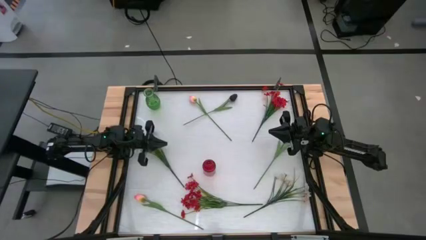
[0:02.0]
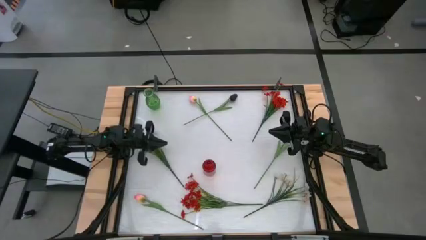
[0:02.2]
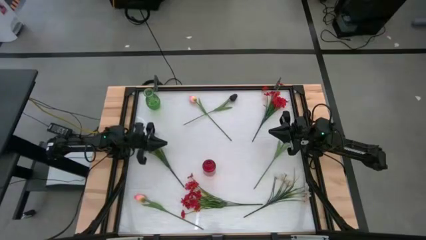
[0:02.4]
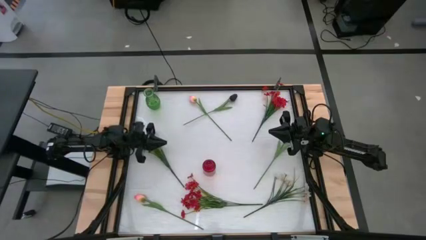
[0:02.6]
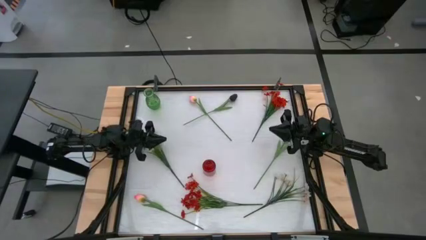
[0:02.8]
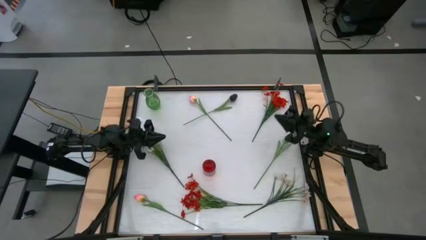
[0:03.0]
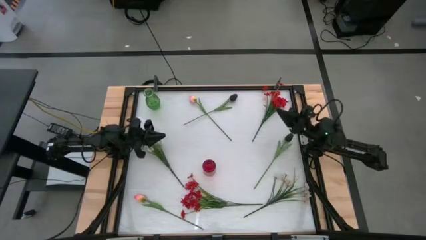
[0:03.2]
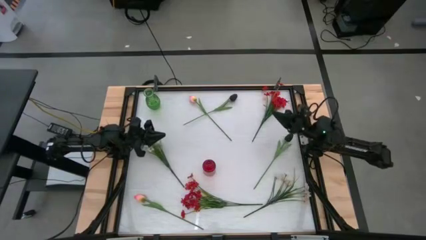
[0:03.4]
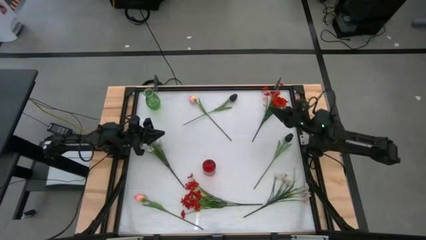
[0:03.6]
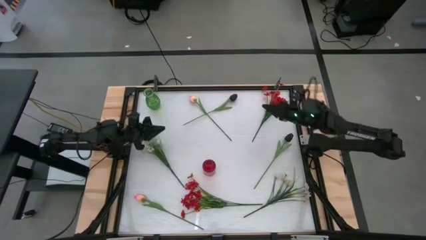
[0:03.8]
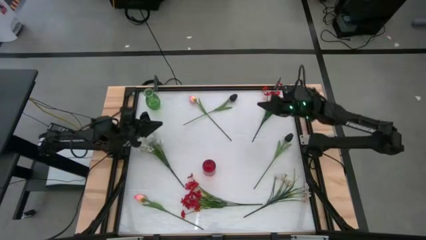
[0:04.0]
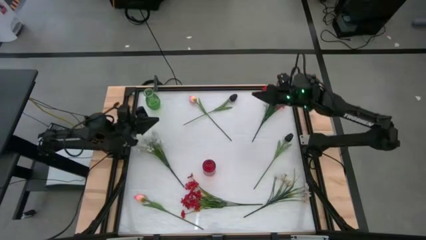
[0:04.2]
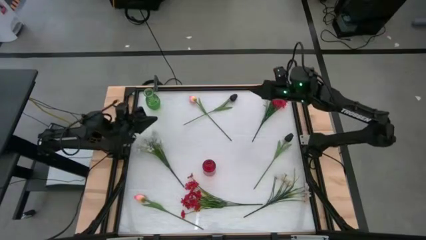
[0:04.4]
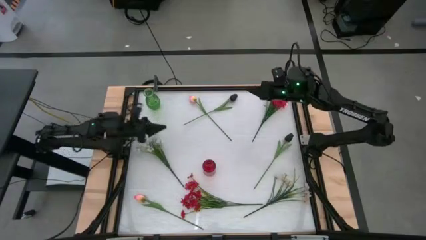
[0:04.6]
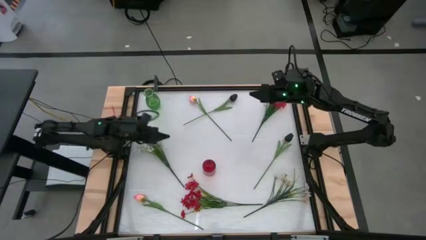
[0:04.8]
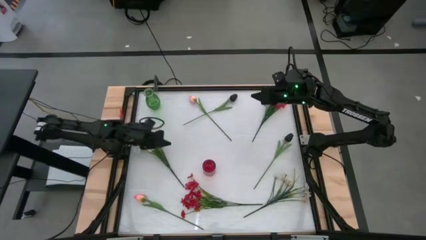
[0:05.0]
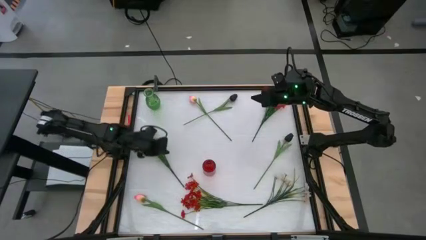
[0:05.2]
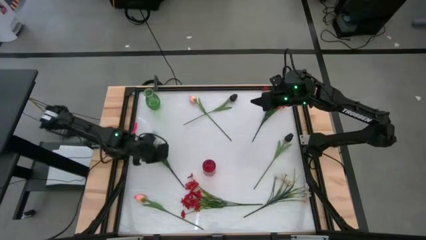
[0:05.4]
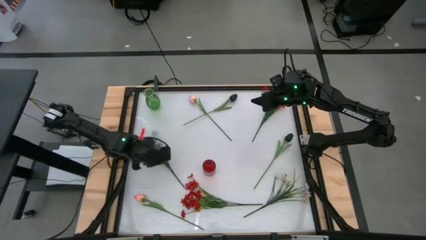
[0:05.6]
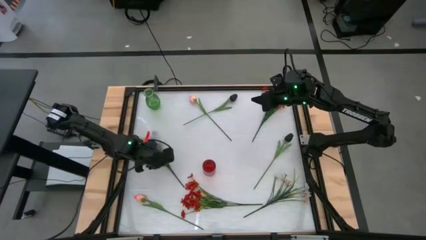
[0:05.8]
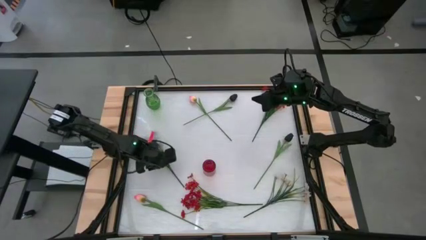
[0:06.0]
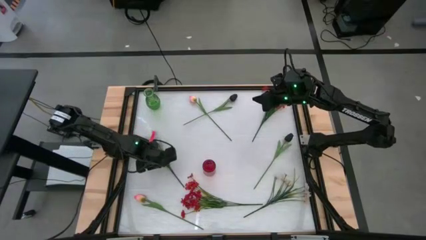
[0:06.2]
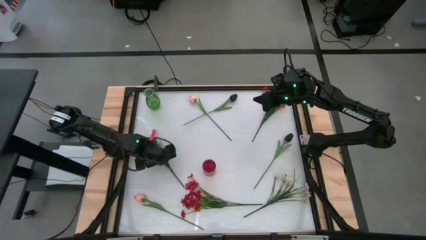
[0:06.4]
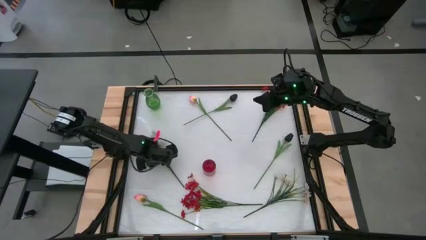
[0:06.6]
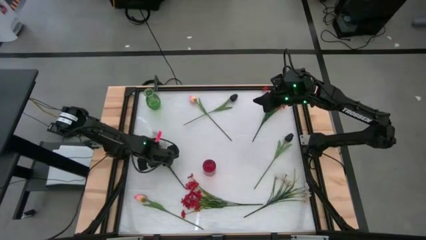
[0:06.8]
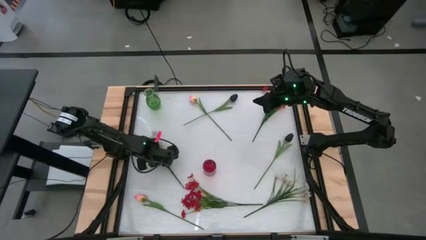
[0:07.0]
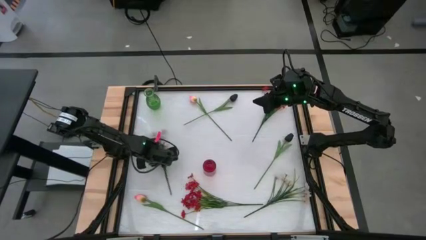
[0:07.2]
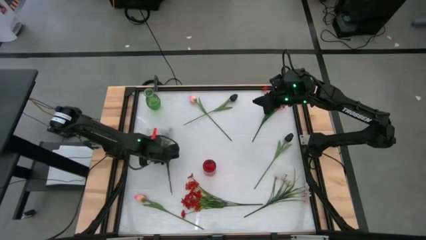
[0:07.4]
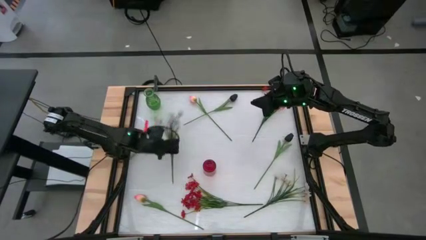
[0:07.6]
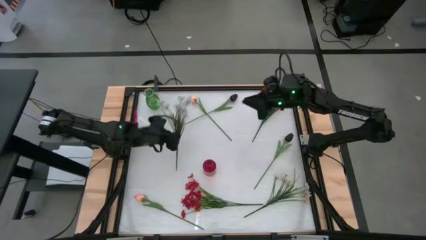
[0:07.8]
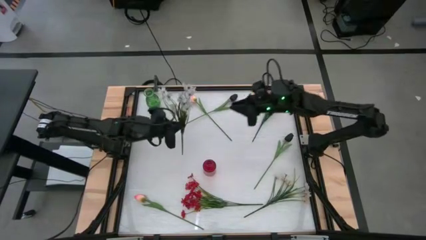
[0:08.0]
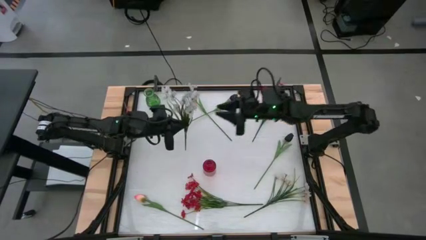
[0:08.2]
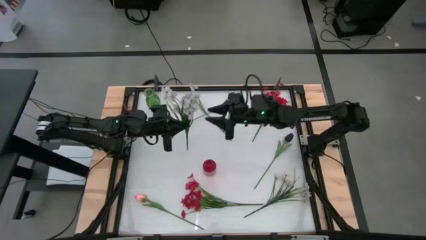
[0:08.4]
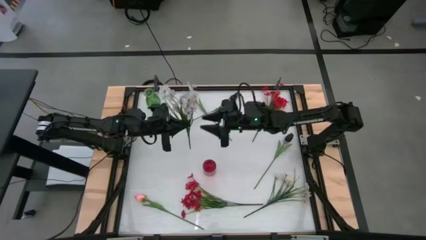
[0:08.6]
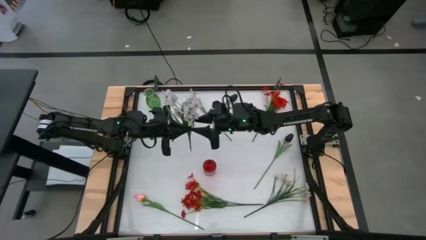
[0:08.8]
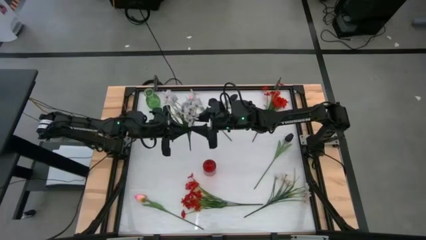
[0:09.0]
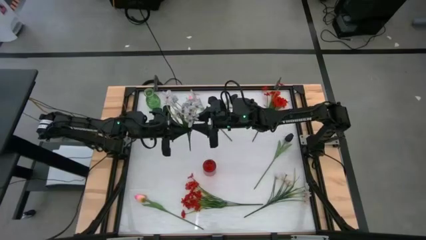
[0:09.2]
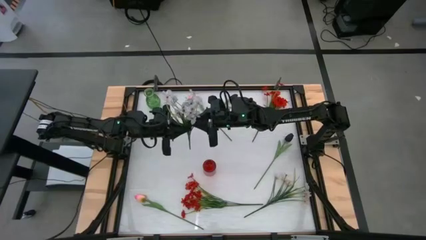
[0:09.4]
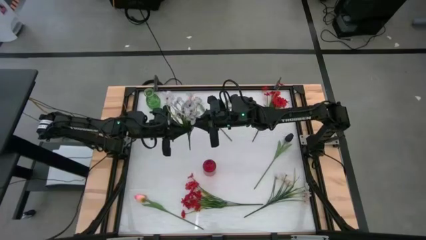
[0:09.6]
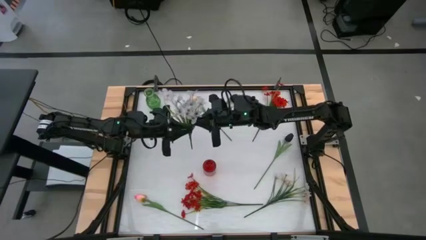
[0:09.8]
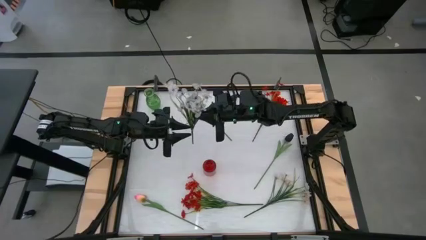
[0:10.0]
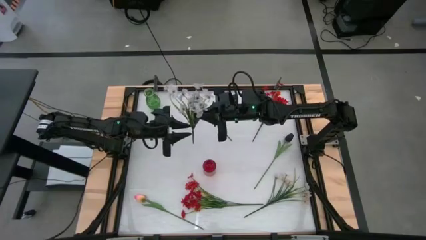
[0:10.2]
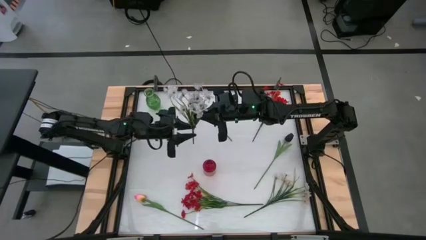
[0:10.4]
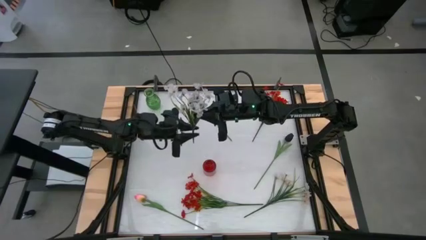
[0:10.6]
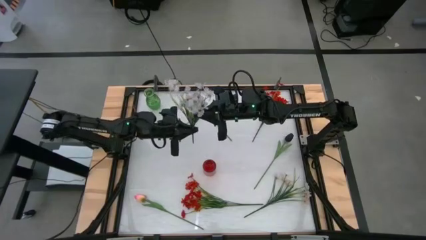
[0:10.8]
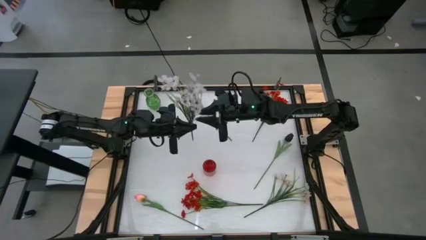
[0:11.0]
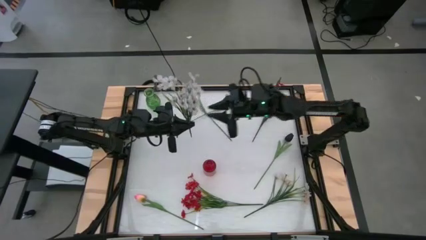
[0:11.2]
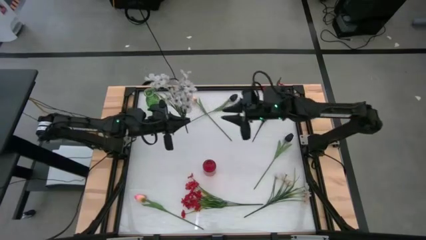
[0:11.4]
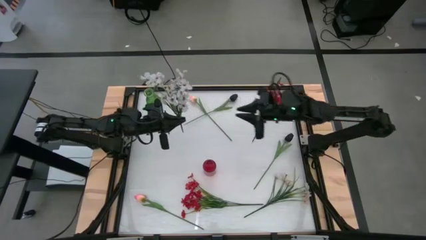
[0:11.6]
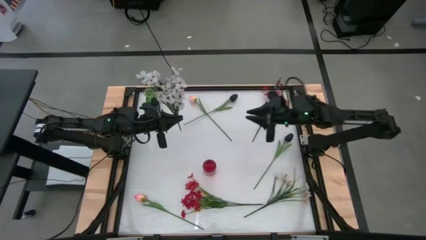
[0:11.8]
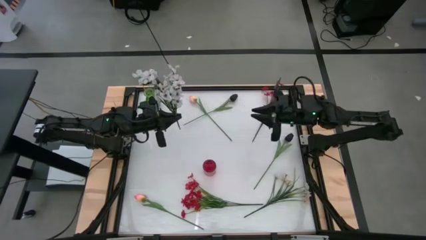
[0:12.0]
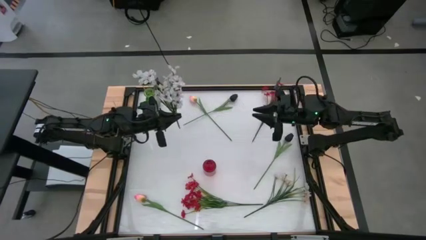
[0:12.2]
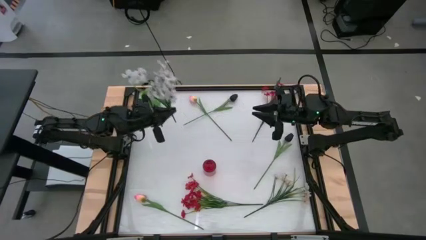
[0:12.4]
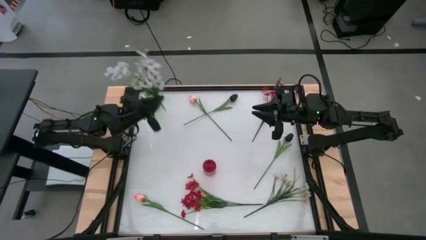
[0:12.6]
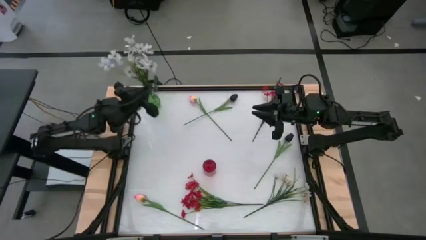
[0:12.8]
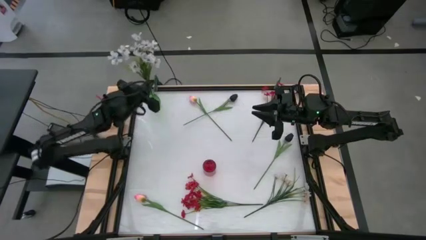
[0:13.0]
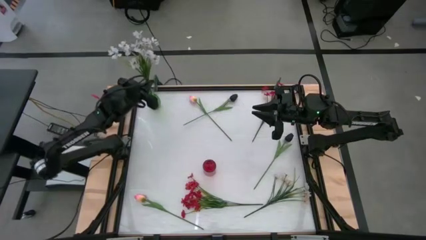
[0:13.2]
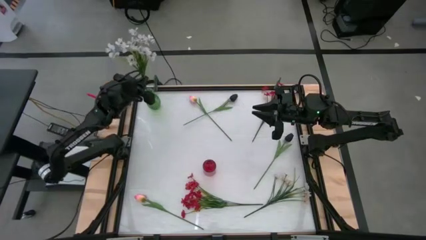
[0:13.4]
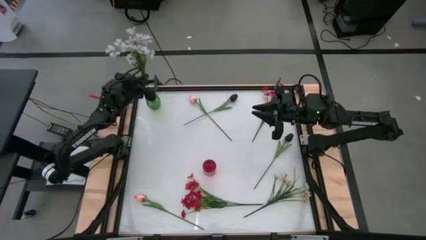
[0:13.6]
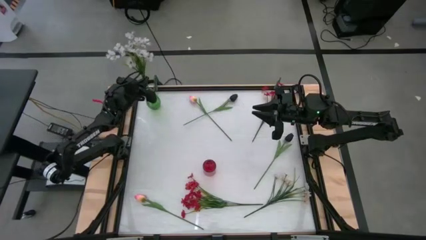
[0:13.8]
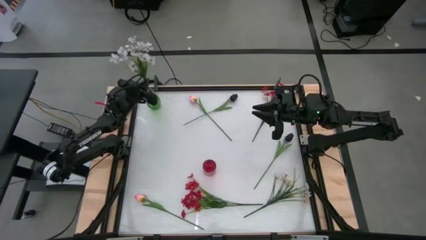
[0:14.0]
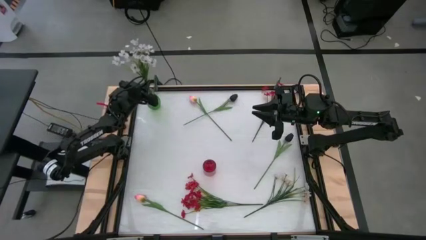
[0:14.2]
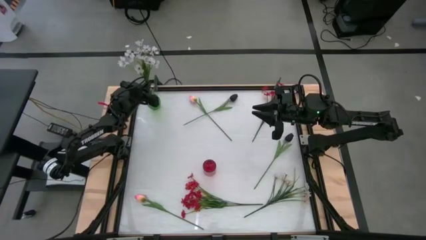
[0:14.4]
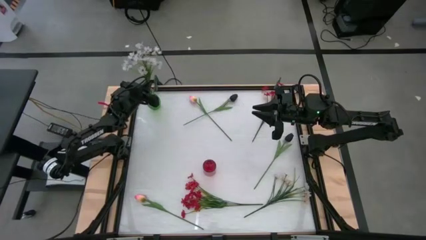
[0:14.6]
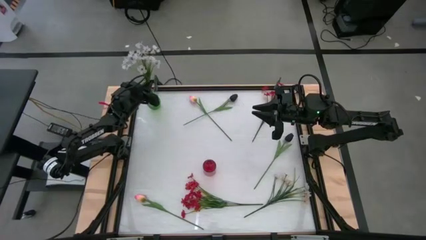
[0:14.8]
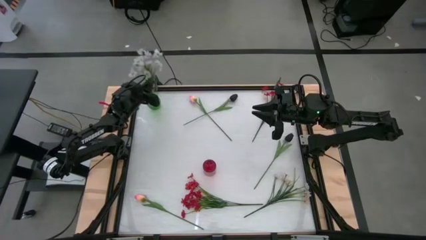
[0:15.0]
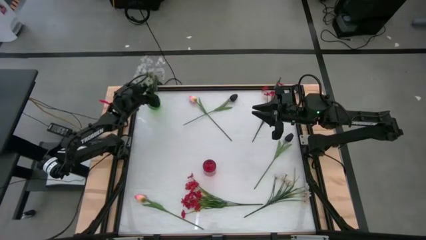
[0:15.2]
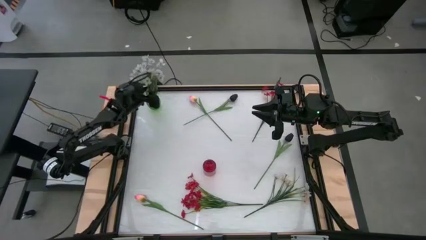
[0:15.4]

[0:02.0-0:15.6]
Task: Sort flowers into vase by color
Put the left white flowers into the green flower vase
